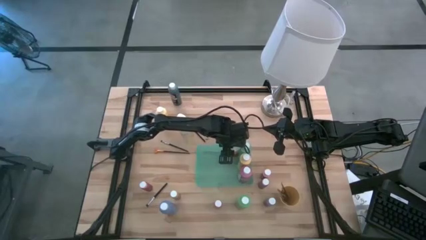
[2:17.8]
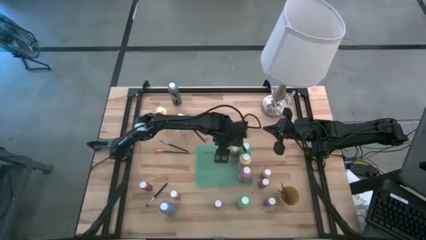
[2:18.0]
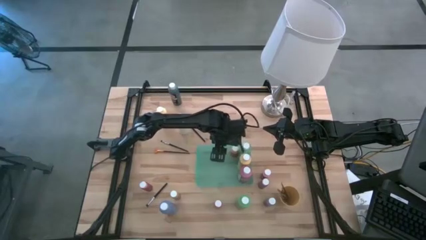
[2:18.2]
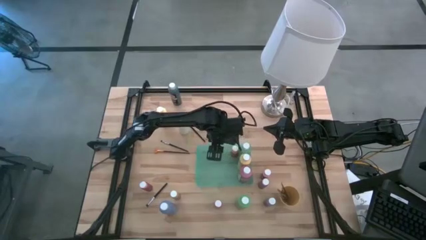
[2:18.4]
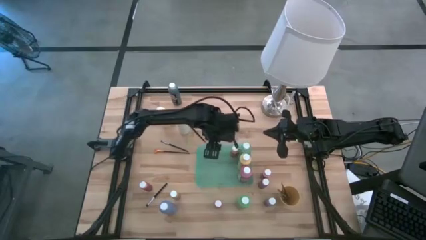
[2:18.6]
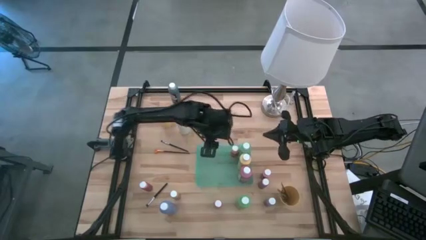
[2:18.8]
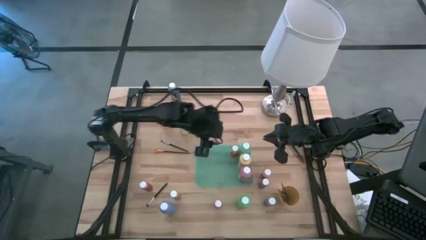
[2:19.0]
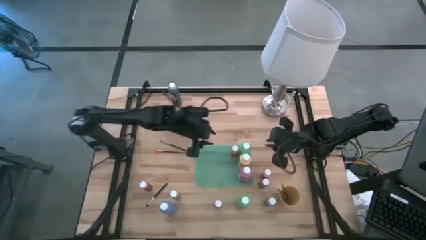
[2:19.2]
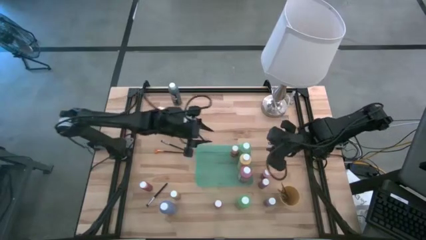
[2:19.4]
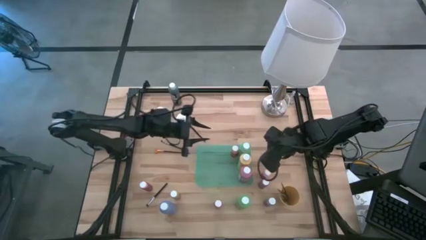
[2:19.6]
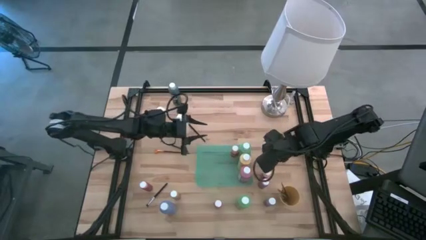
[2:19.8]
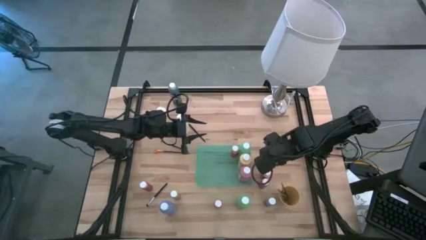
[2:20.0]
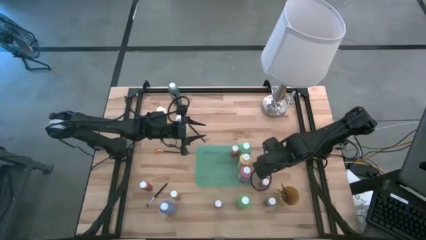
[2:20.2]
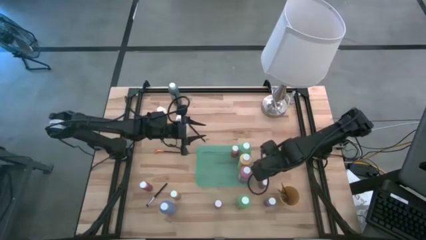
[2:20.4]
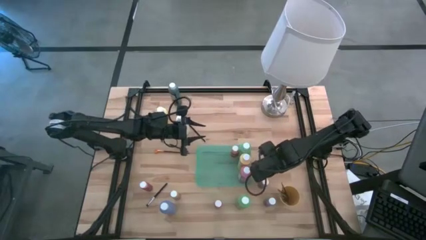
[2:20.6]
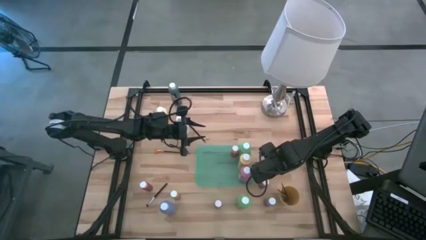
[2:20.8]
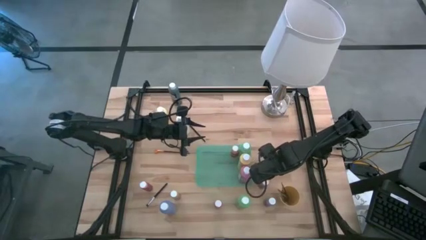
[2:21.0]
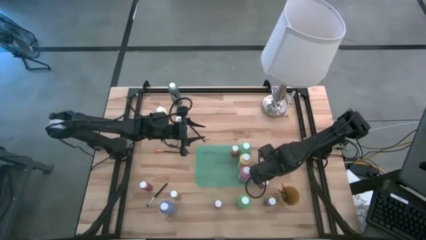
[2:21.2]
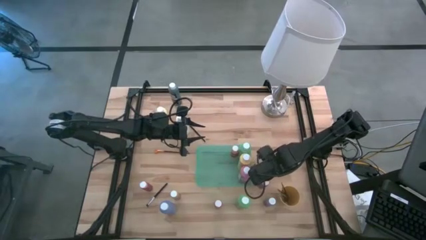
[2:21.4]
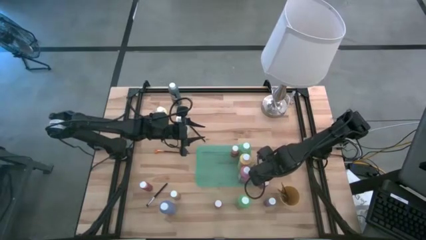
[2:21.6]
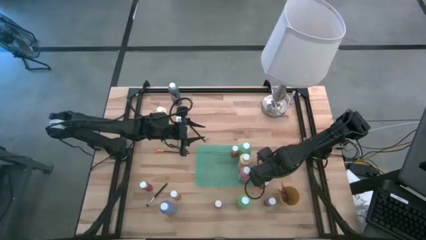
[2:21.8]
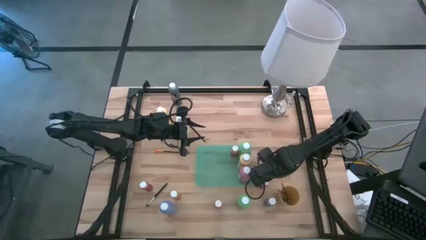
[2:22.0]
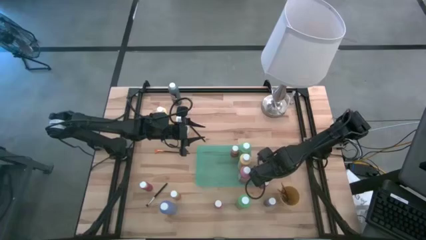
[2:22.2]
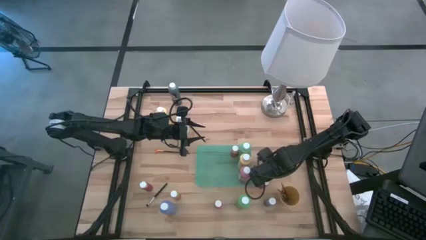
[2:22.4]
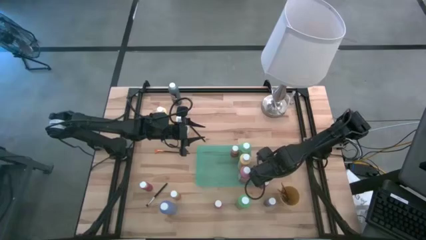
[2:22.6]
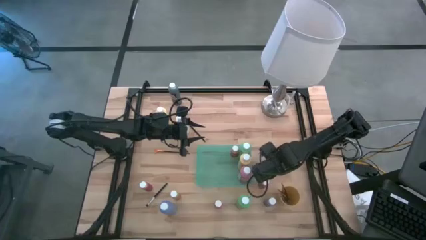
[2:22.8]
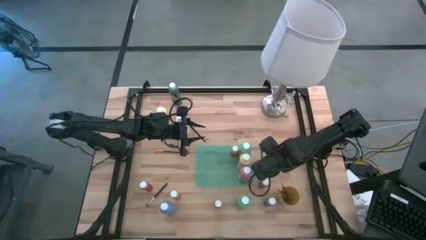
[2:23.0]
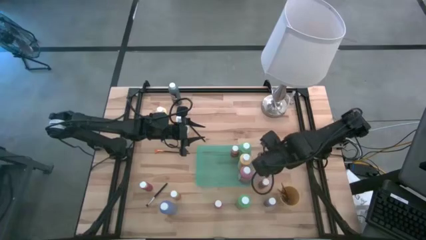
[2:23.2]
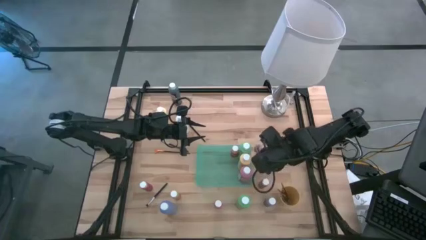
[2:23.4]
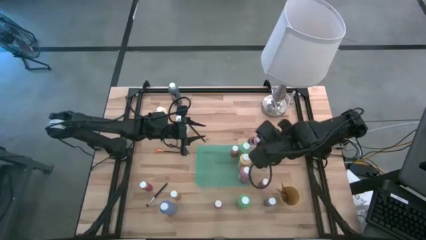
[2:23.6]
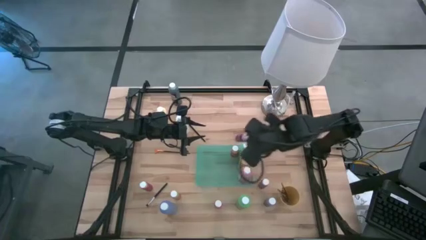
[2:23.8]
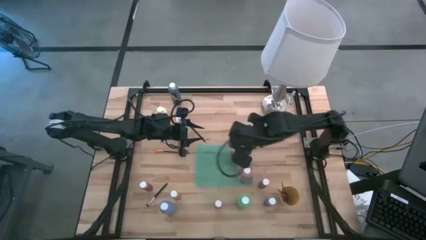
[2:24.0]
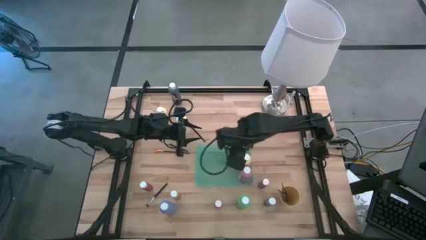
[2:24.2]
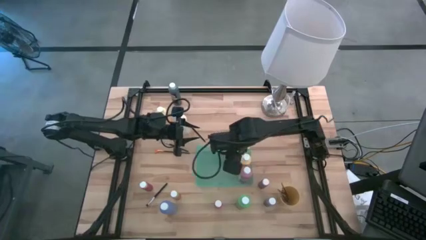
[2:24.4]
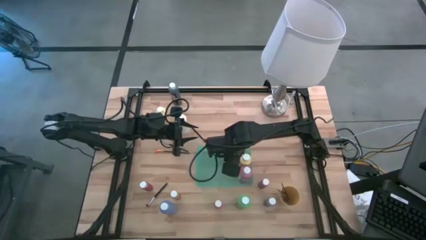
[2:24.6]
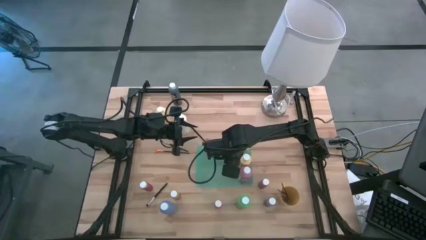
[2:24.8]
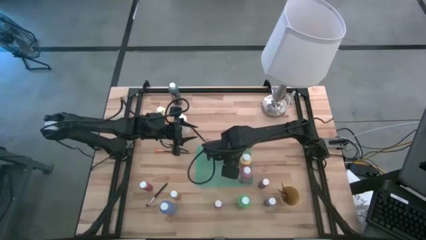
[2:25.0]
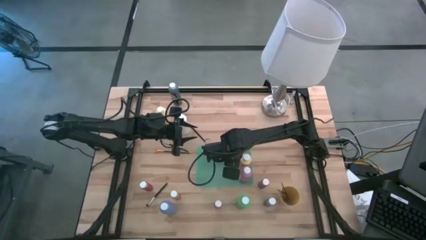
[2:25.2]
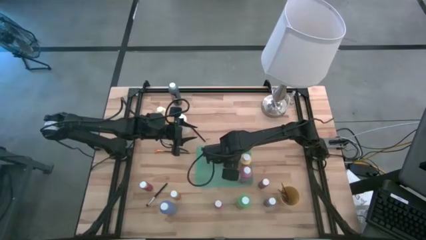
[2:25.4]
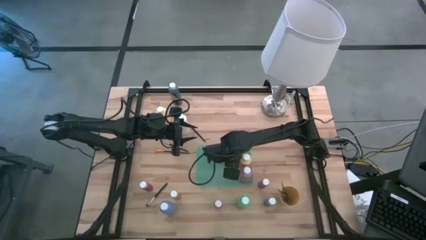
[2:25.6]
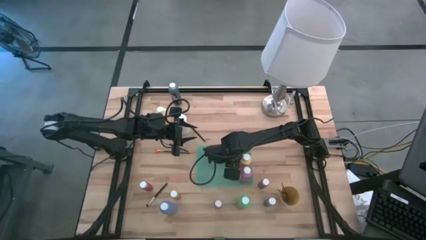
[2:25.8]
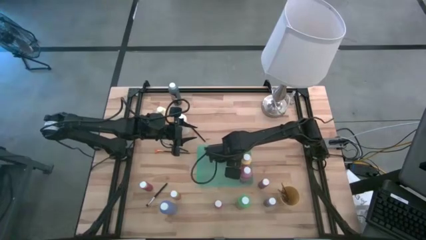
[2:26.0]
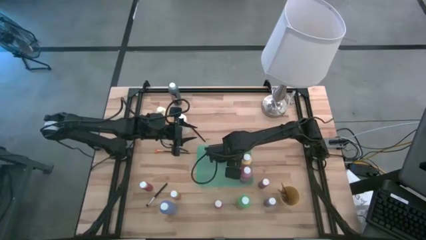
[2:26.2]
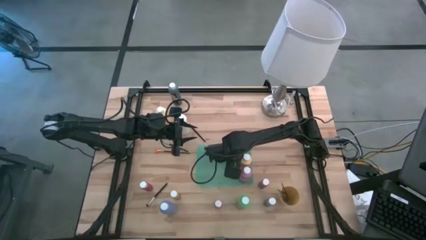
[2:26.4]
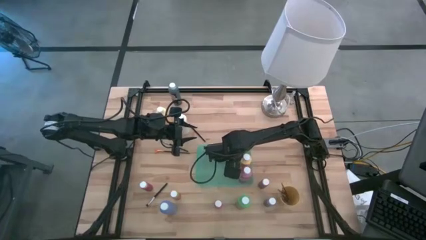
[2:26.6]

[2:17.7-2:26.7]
Task: Pick & Place Paint Supplies
Put the pink paint bottle into the green bin

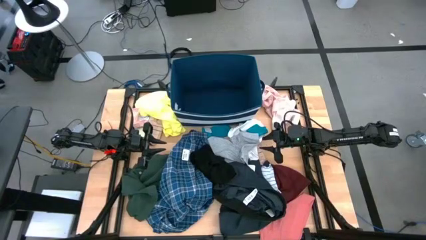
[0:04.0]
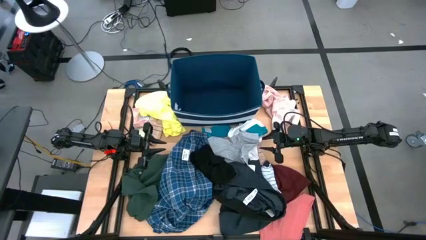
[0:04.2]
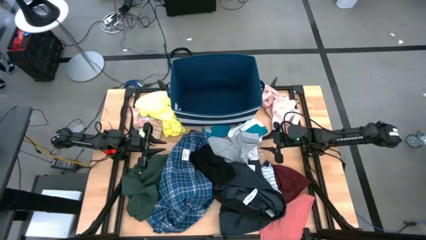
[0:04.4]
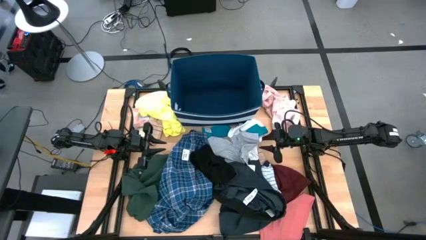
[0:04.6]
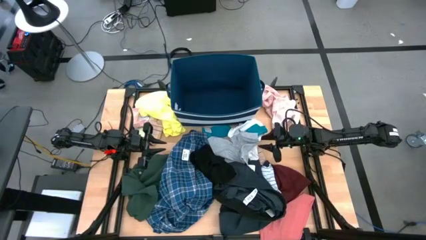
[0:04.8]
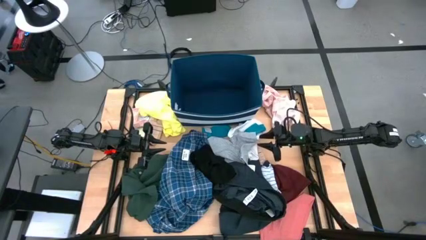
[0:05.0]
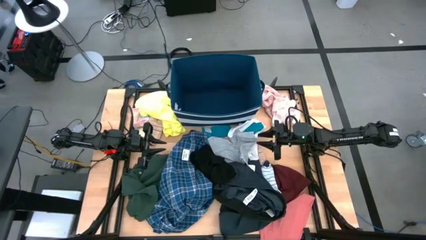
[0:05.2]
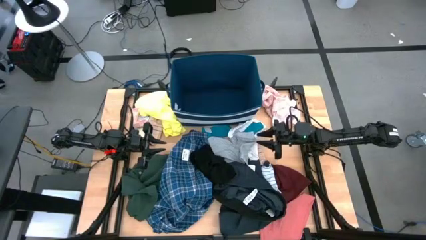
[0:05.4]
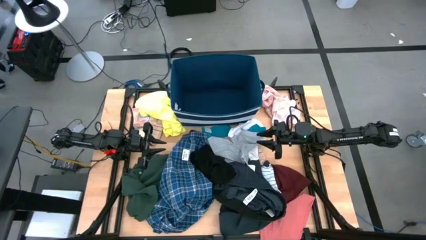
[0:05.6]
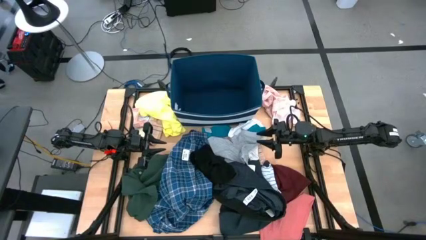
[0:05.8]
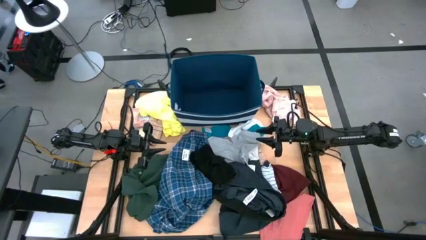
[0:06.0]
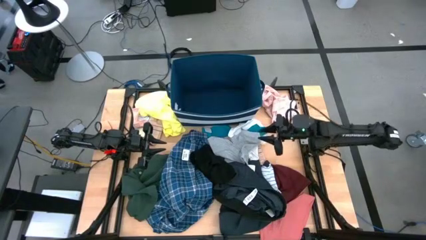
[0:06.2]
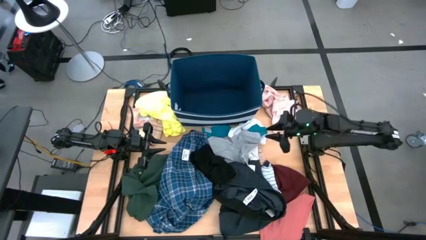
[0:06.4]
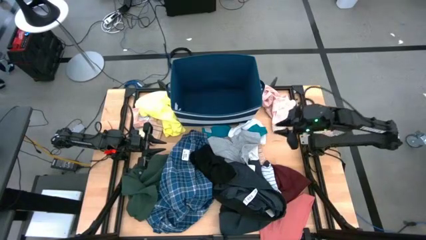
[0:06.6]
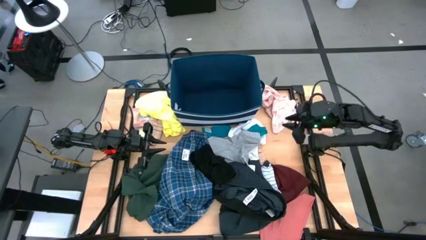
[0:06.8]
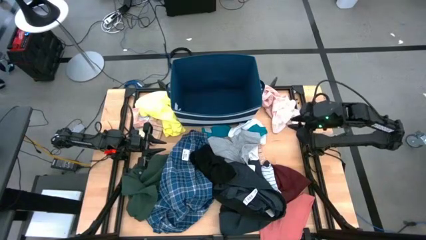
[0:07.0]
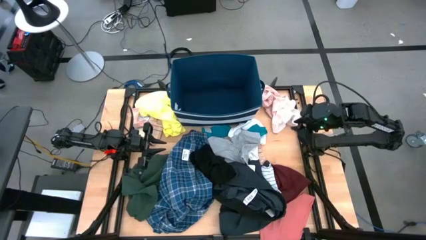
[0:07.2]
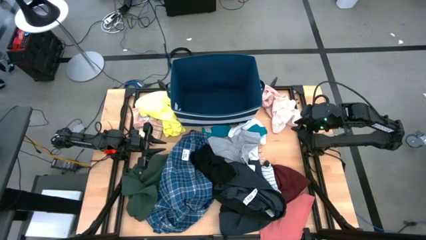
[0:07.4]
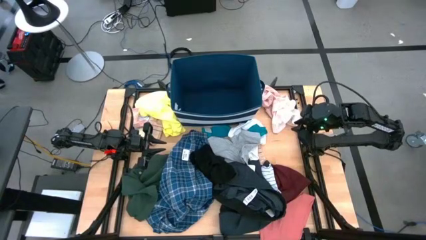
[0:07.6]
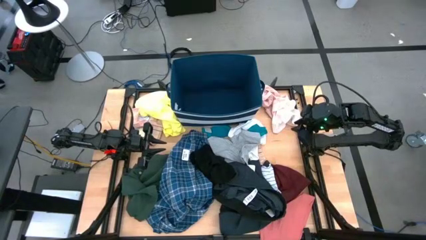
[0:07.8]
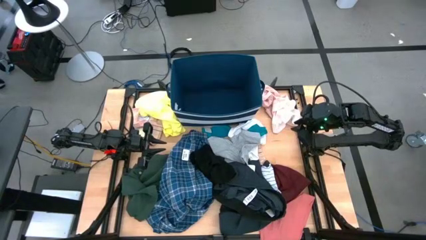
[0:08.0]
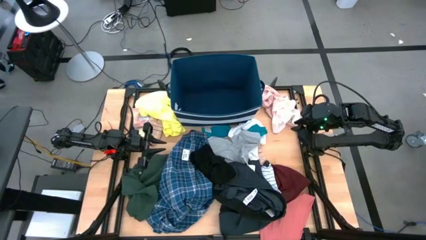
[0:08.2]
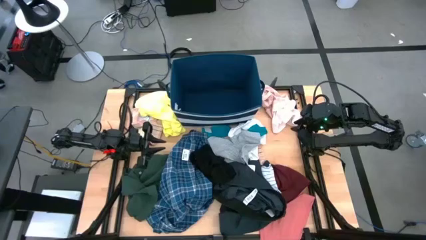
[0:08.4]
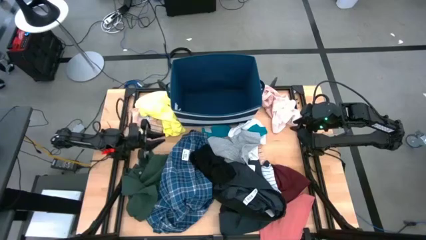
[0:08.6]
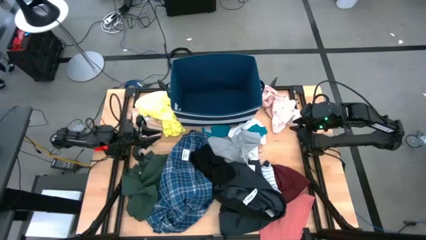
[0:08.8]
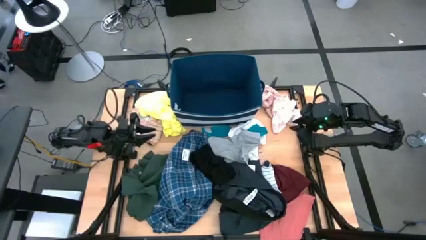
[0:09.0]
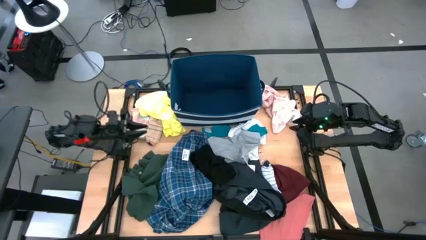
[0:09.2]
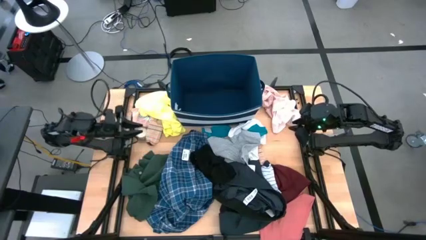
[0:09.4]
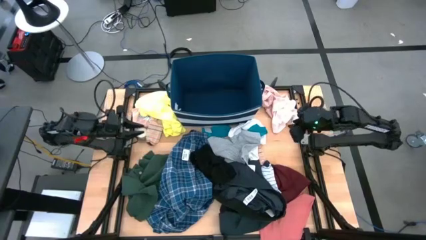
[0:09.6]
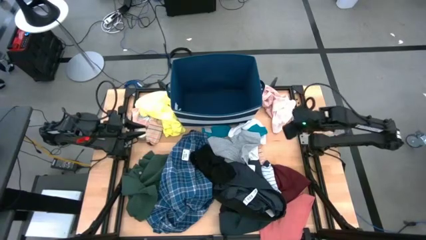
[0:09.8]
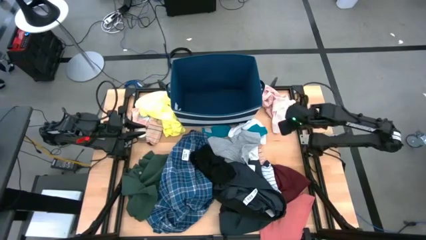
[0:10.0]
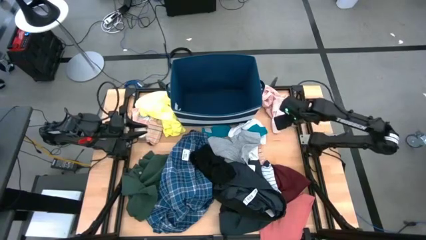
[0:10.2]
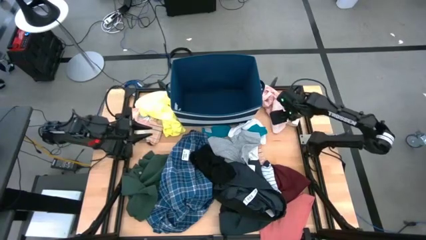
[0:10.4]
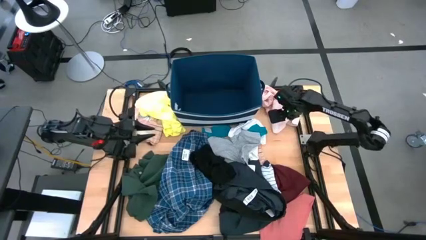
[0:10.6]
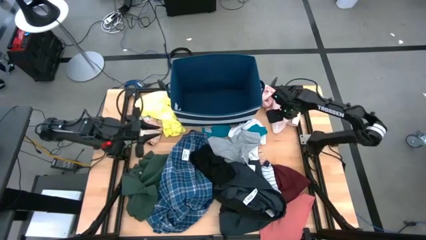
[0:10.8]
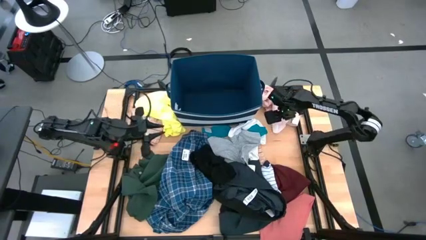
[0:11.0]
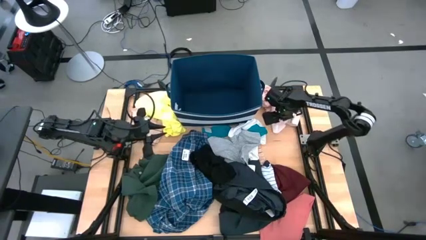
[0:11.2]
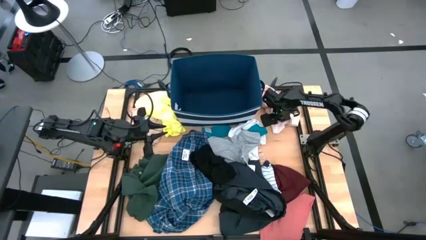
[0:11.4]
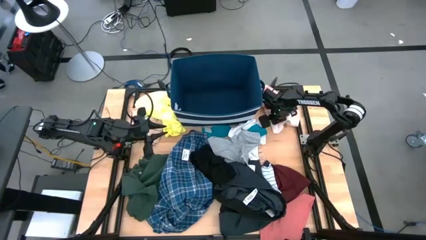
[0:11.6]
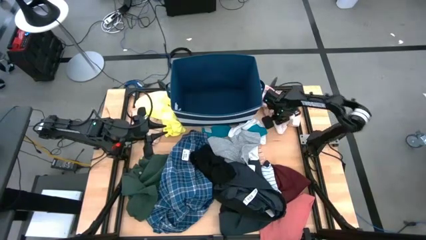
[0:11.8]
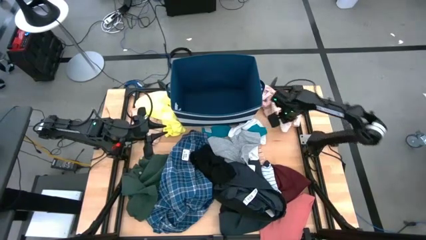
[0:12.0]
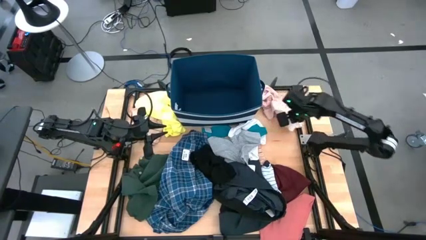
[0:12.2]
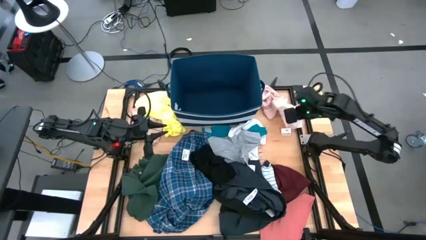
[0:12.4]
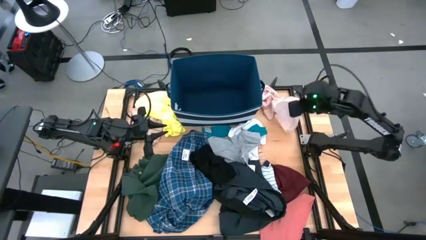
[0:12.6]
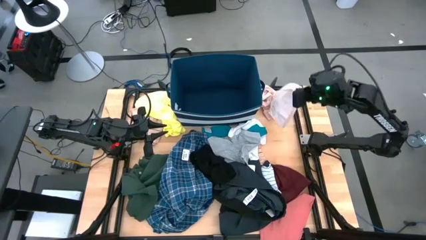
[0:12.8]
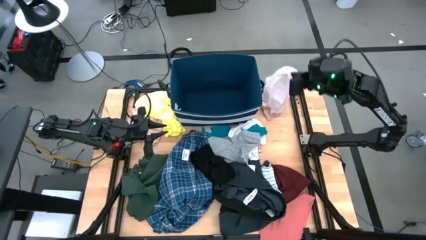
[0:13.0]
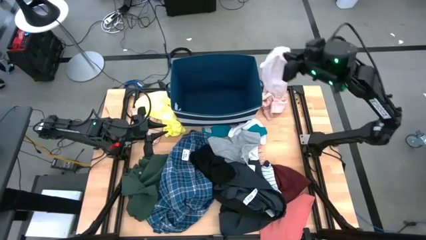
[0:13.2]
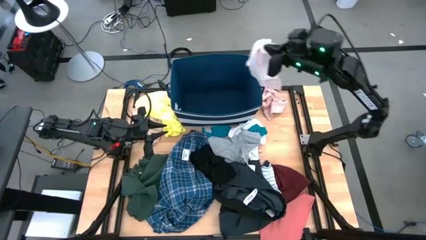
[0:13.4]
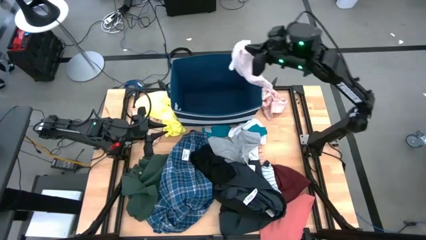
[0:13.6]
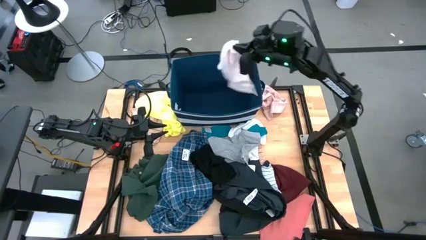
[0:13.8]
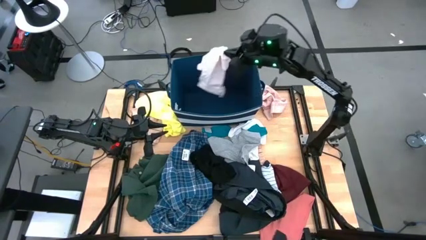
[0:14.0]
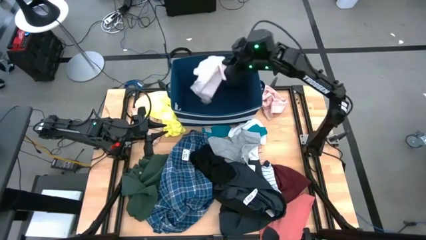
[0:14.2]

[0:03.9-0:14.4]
Task: Sort clothes
Put the white underwear into the laundry organizer
